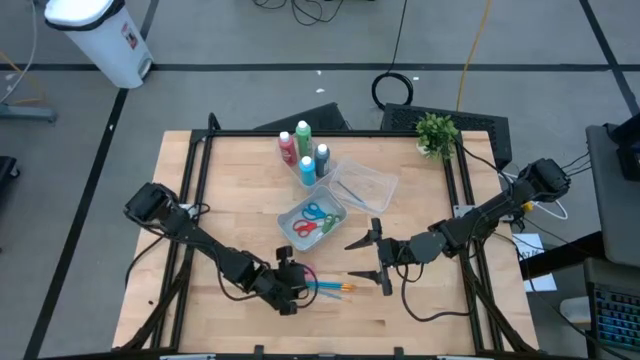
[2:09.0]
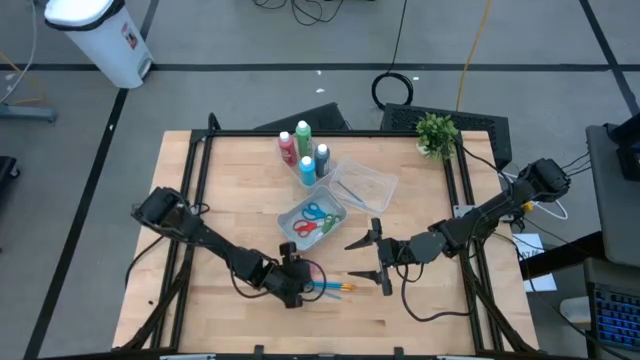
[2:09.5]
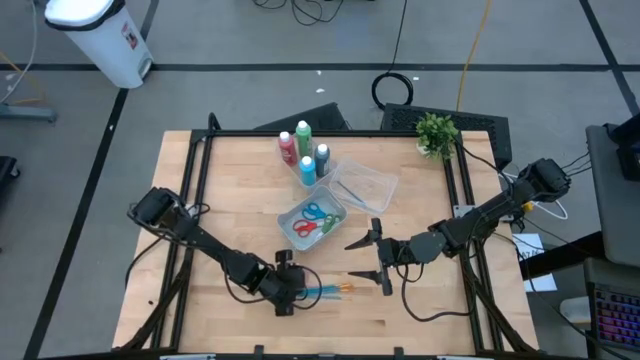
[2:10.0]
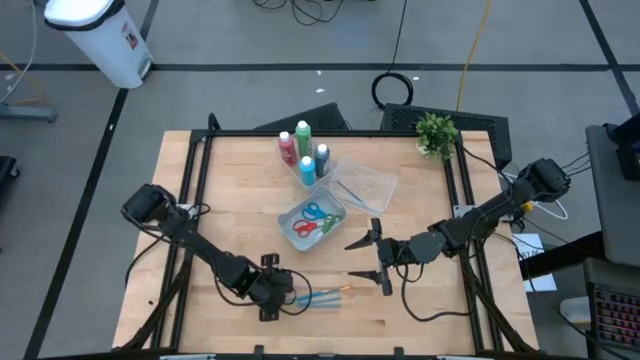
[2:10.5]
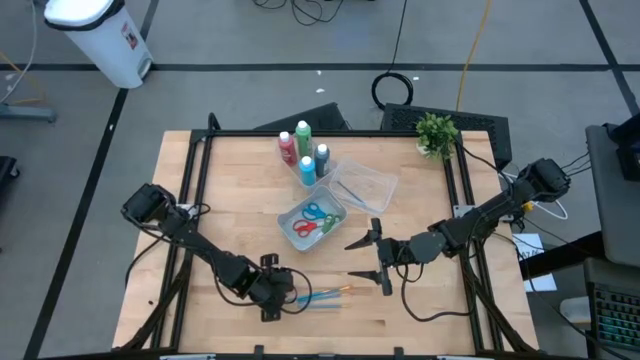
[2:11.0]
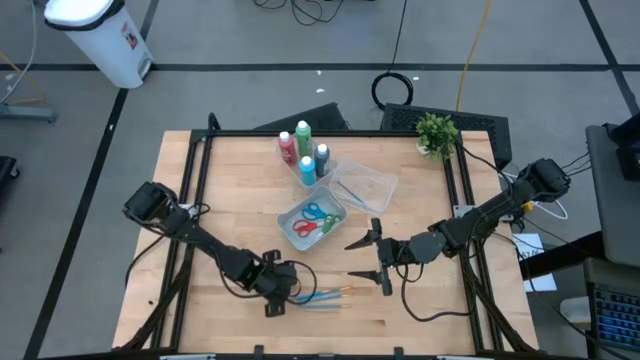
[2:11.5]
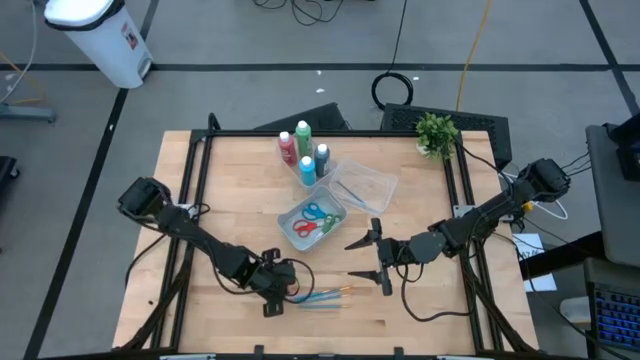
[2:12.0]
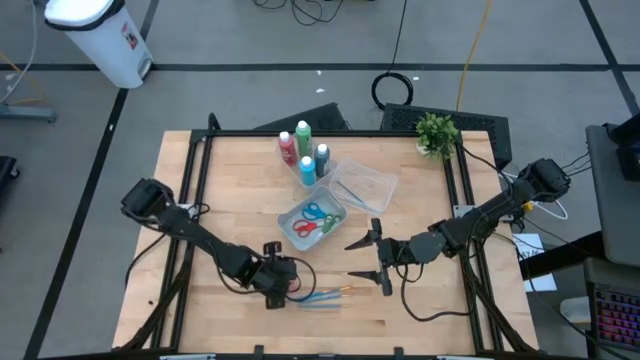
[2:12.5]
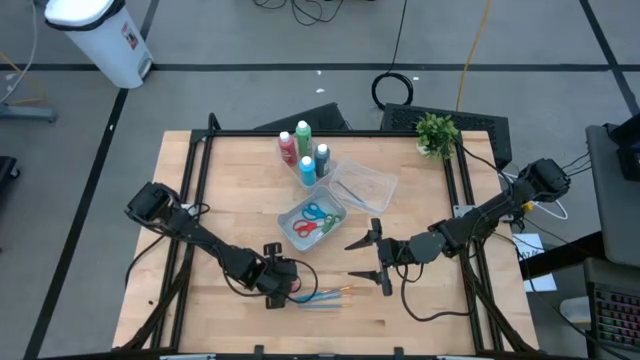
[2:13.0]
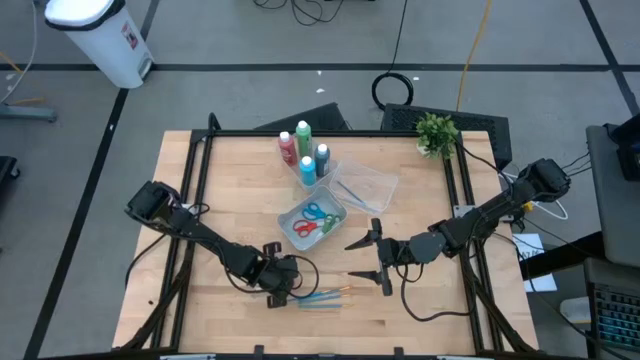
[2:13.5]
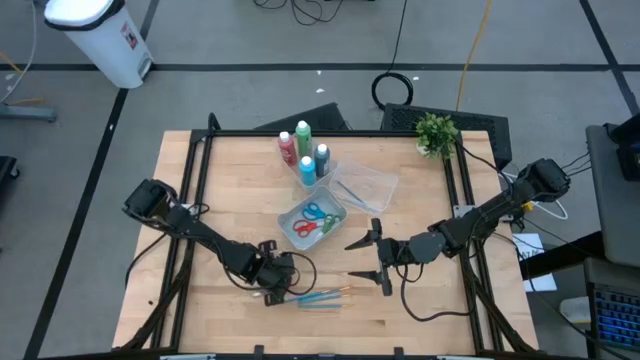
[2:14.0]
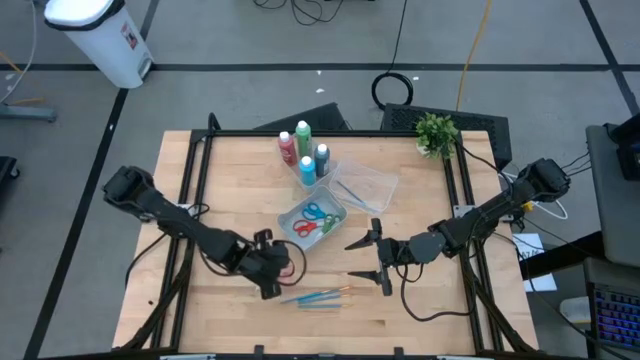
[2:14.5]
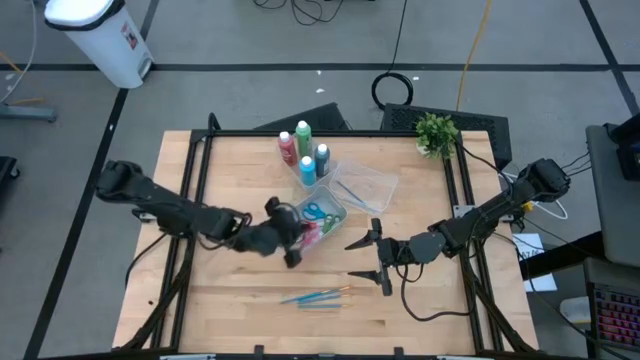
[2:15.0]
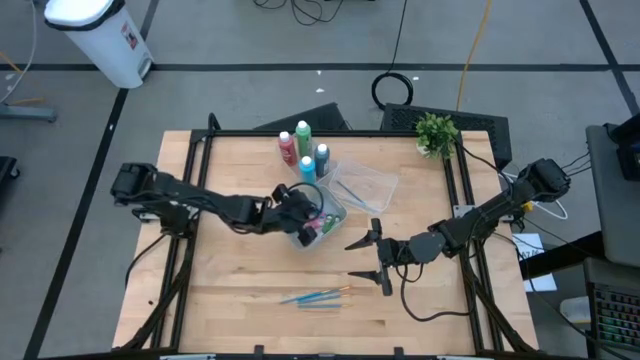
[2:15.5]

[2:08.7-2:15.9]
Task: Pick & Place Paint Supplies
Put the pink scissors into the blue bin

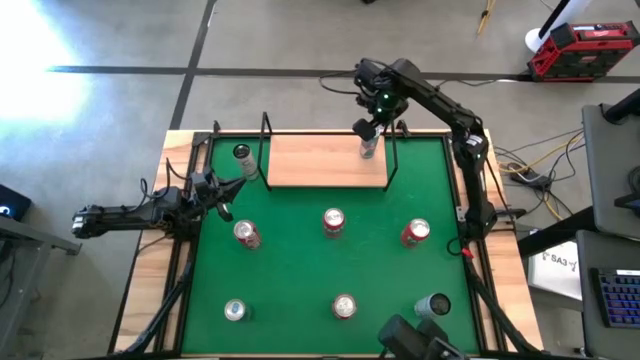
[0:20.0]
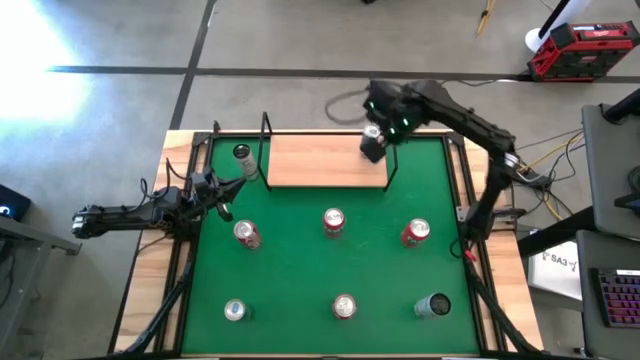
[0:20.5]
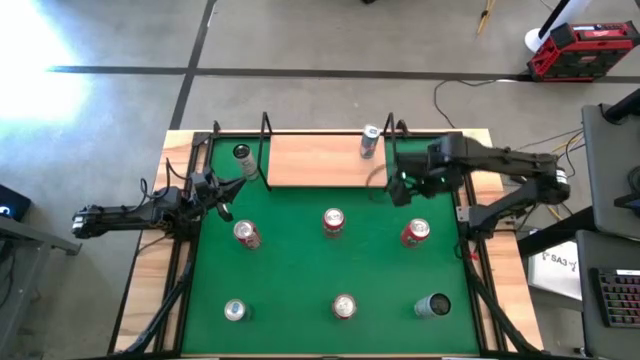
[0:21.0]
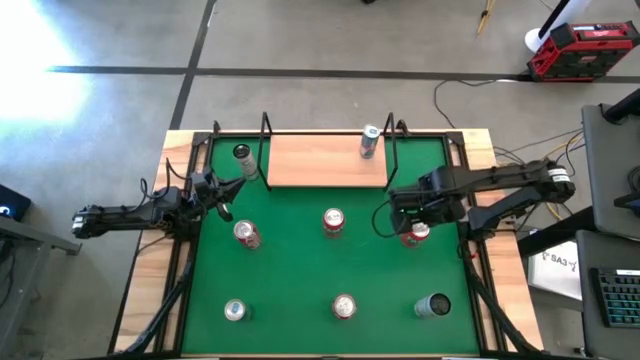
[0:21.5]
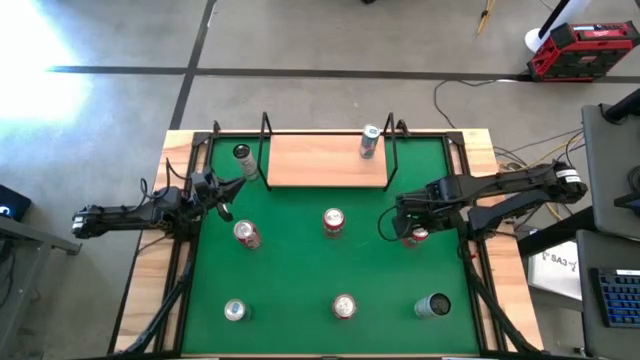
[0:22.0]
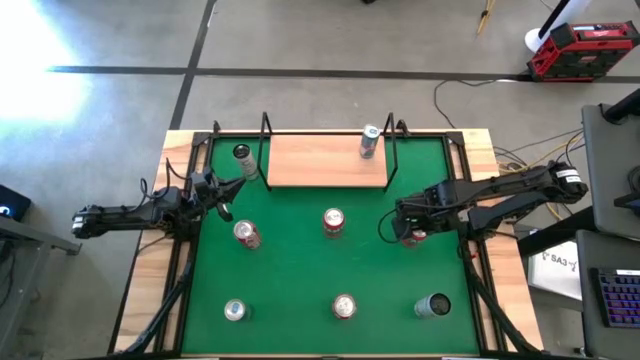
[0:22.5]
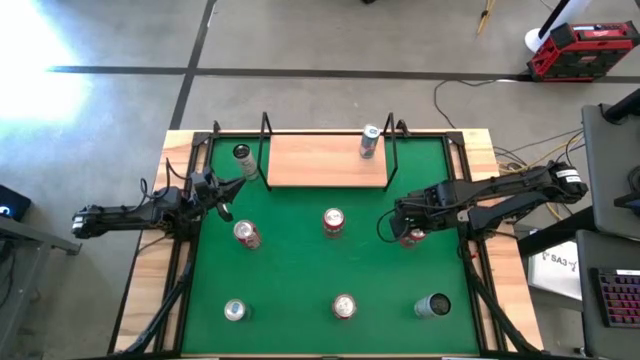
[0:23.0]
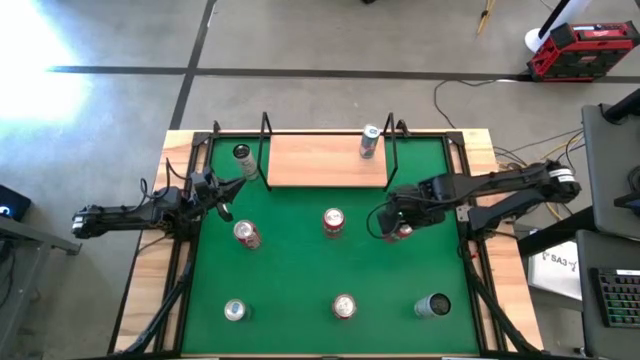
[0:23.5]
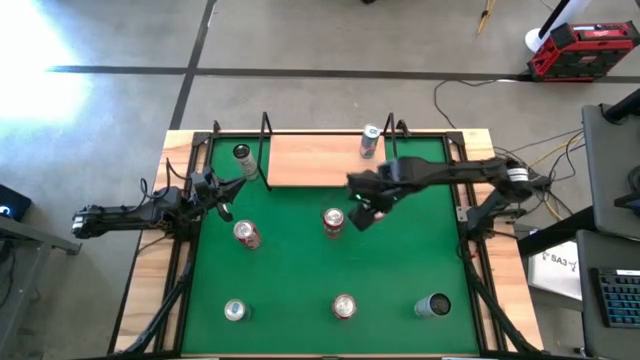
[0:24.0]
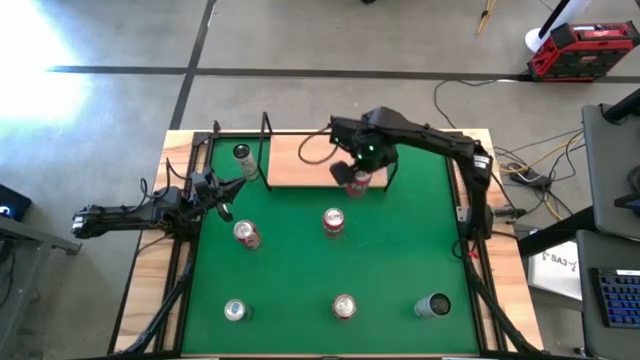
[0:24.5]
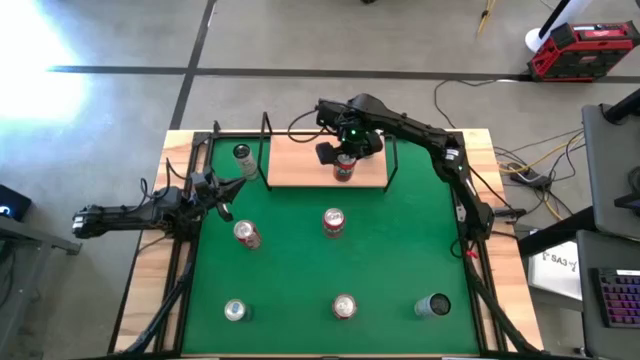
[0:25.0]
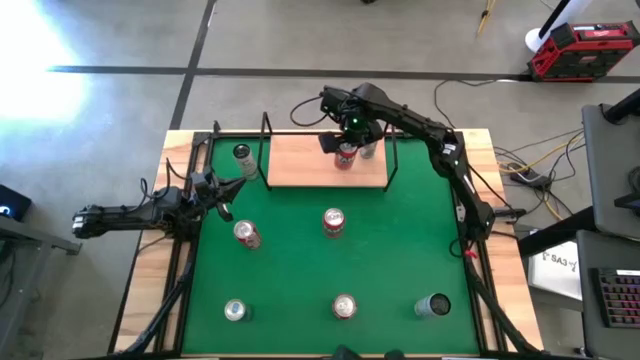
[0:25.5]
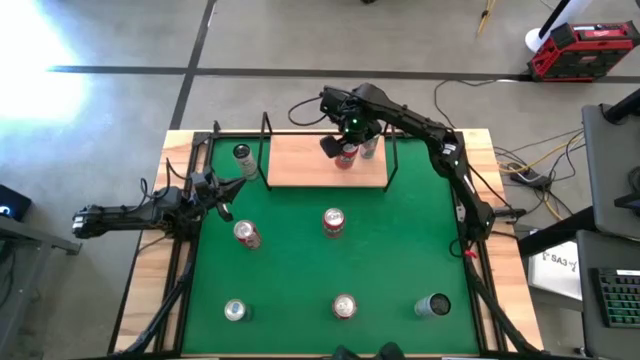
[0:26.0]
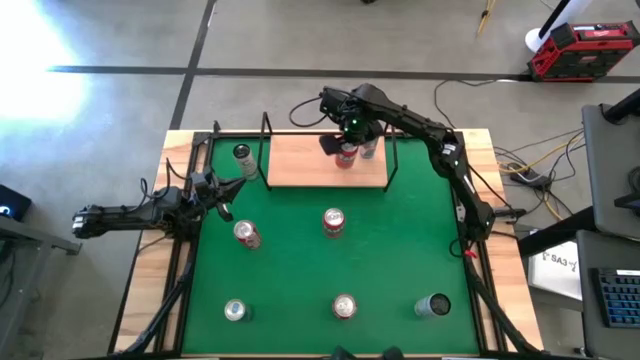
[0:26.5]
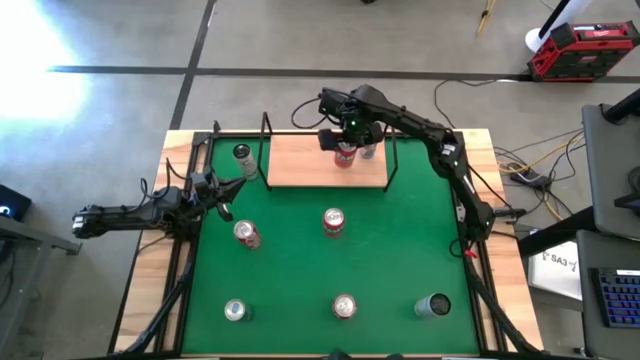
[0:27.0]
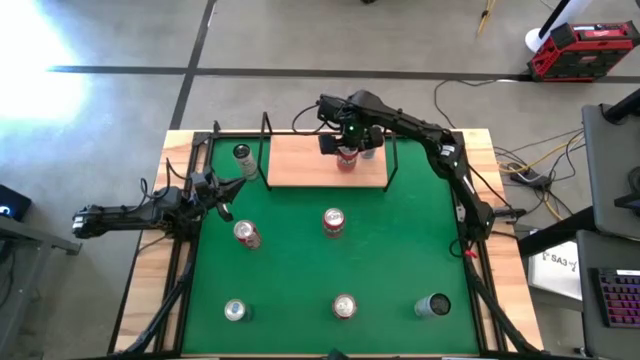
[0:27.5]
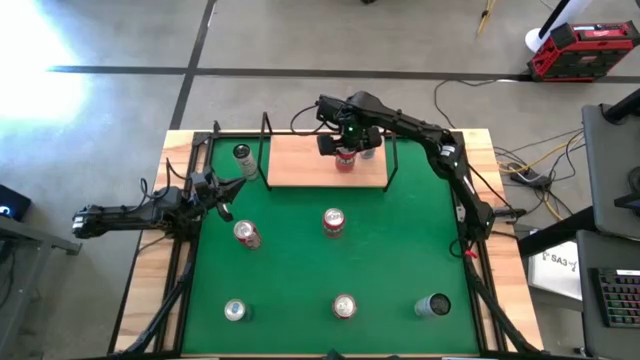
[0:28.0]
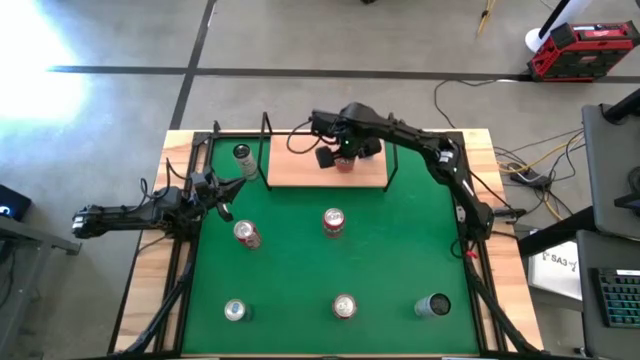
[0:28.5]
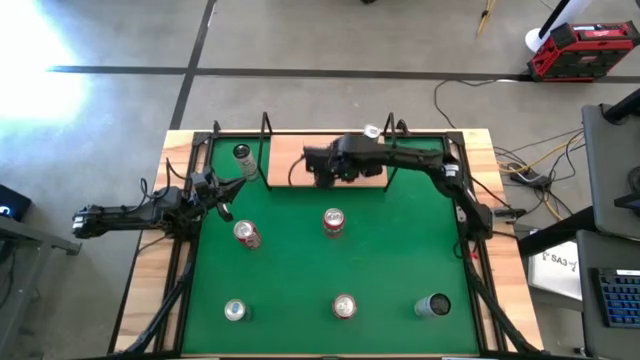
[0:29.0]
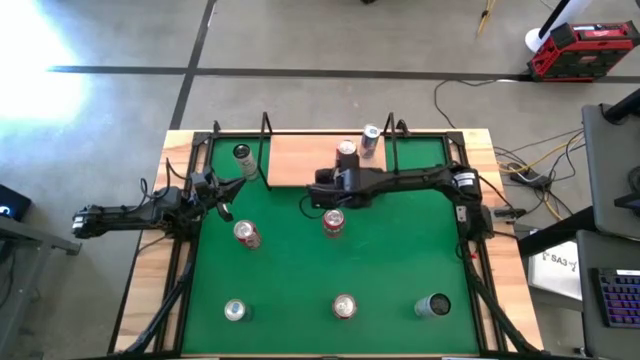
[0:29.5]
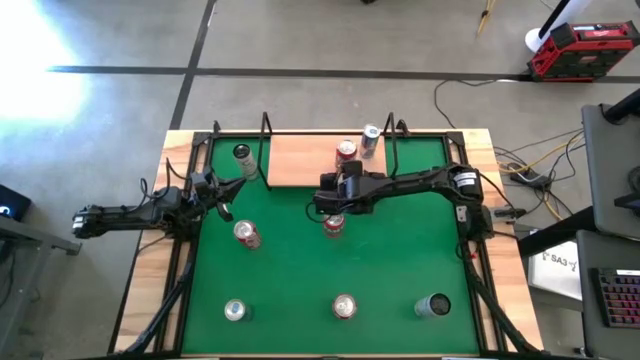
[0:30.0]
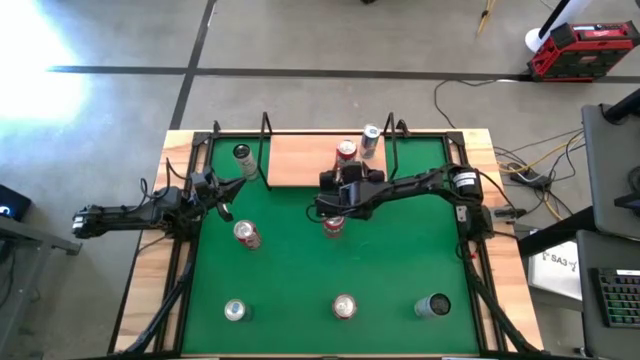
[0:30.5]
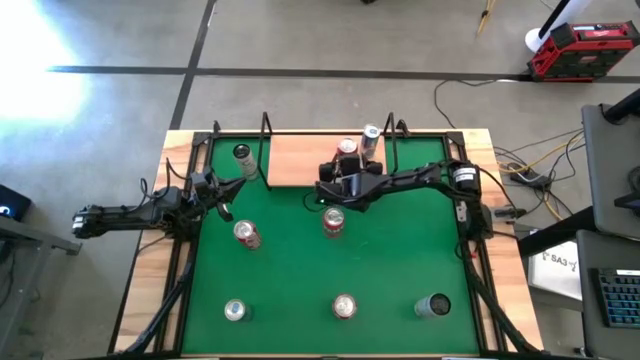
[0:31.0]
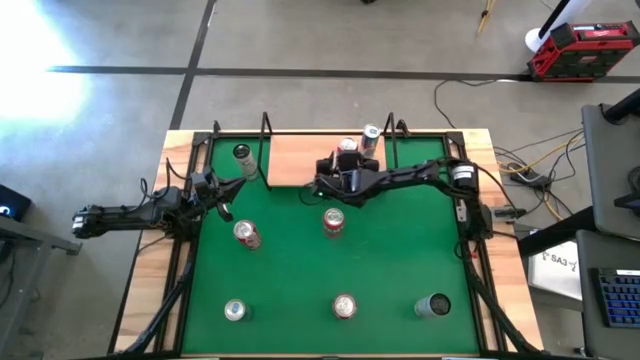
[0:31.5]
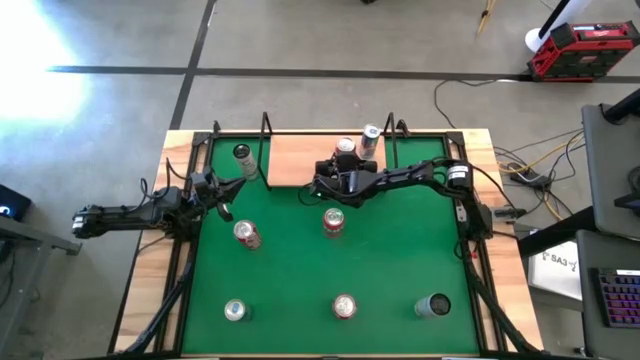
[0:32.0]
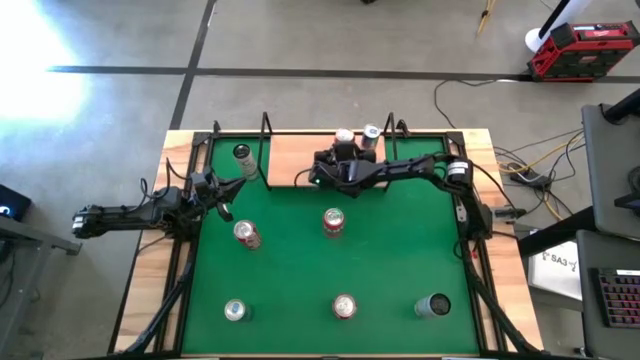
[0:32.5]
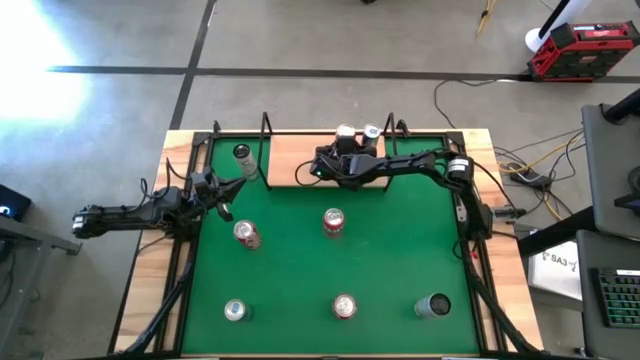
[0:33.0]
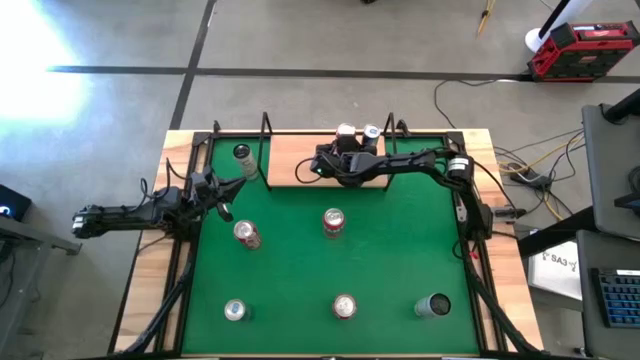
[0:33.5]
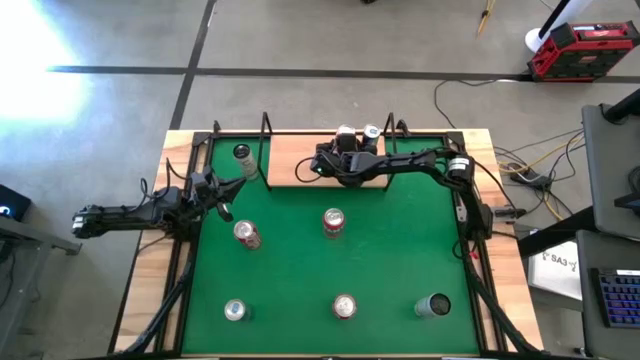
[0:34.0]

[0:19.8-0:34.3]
Task: Place canned beverage on shelf
Put the right red soda can on the shelf
